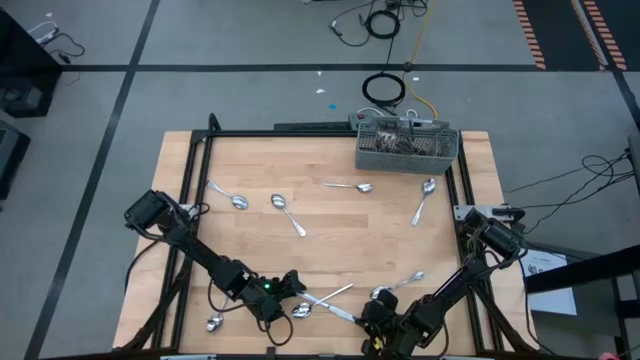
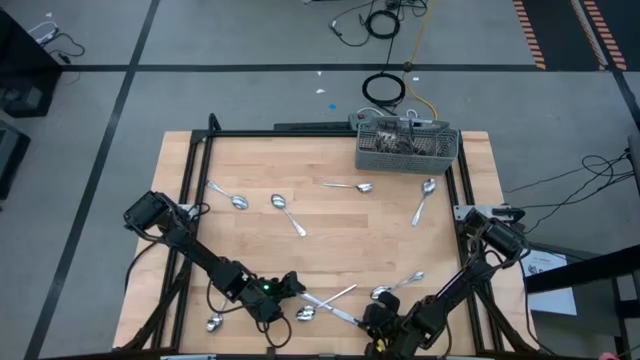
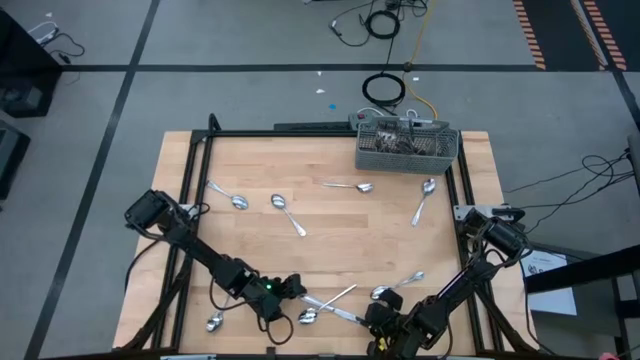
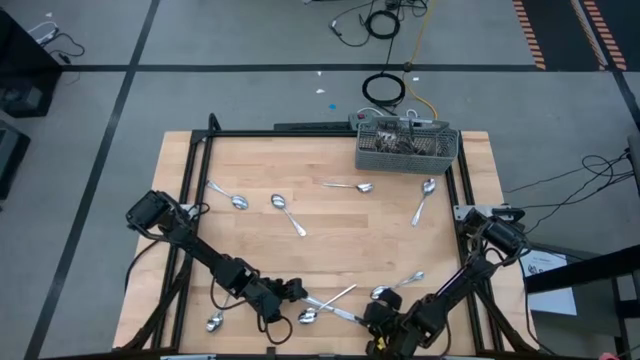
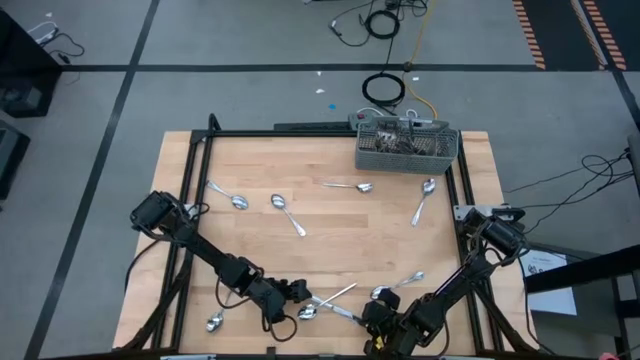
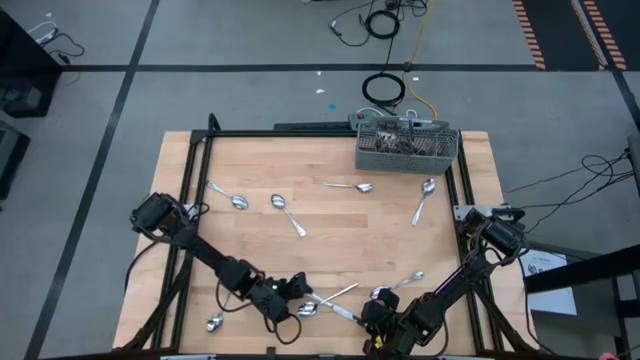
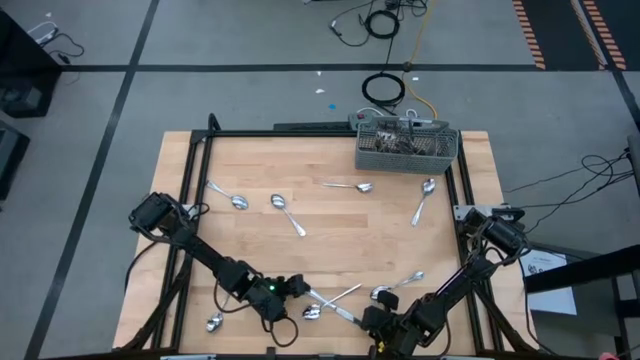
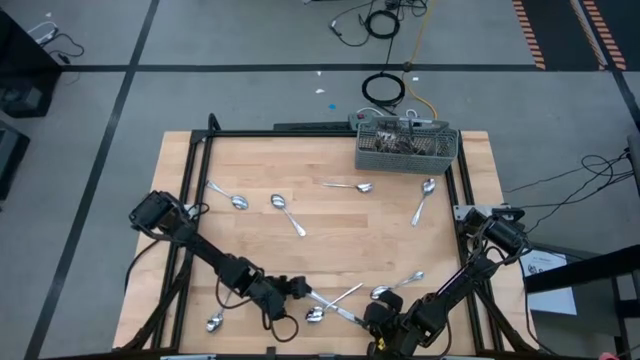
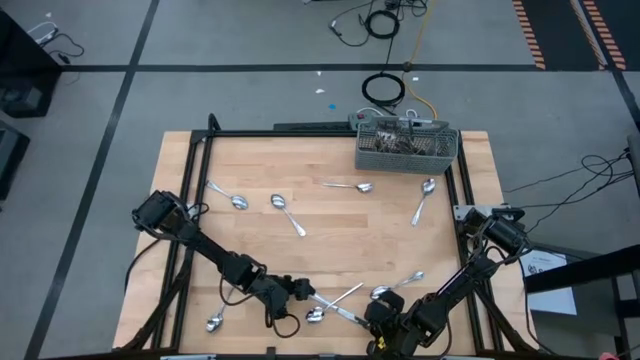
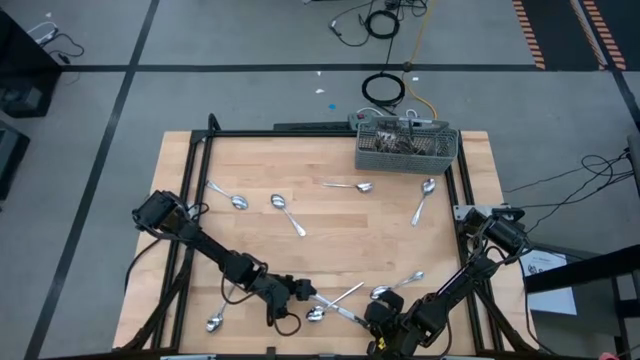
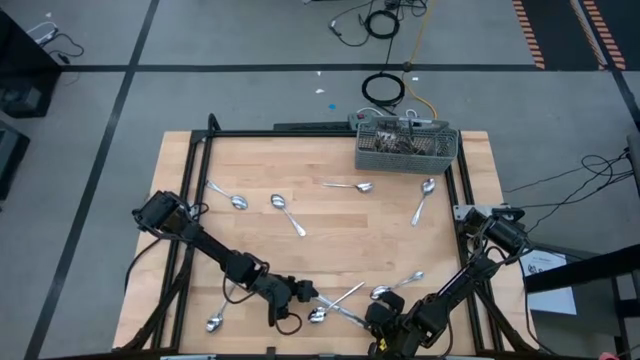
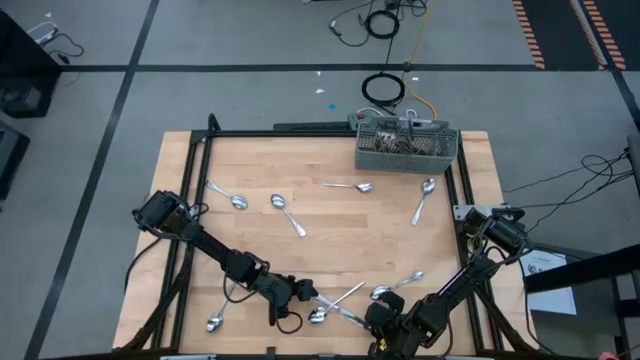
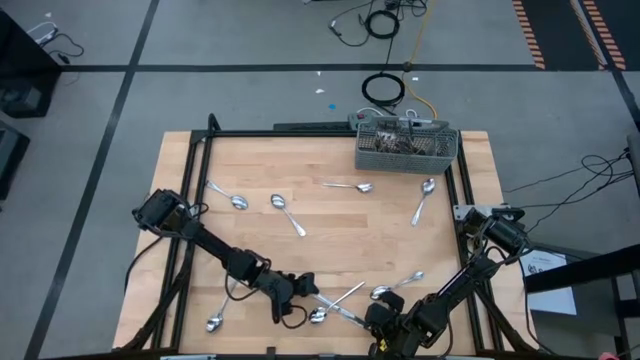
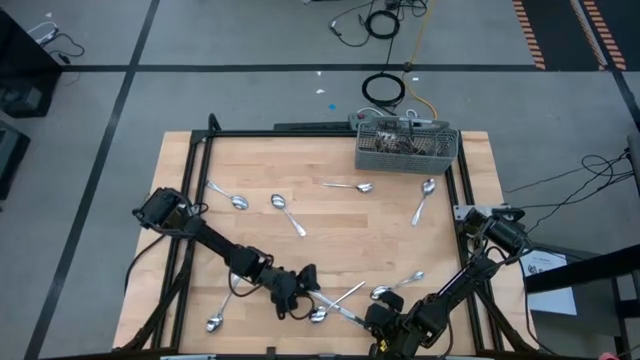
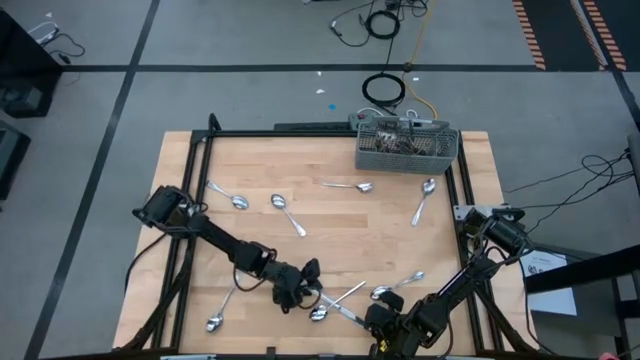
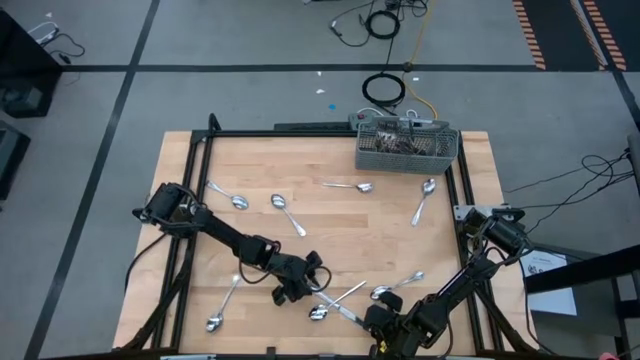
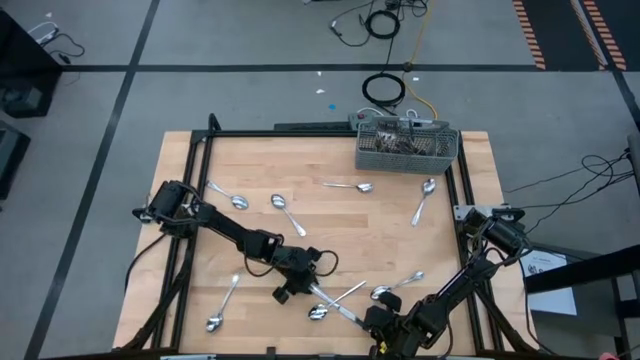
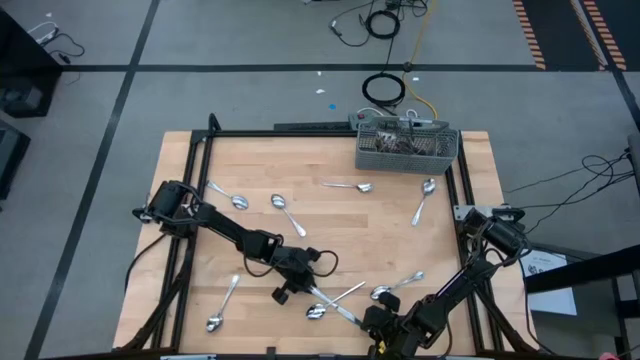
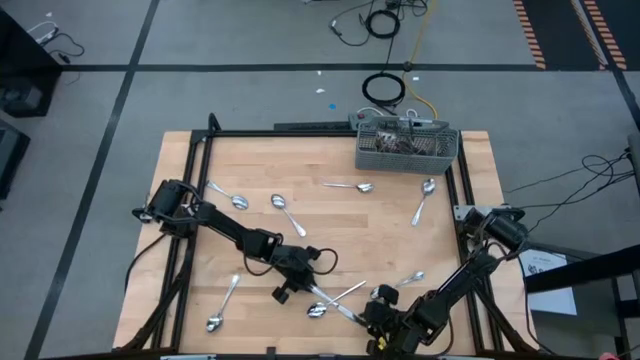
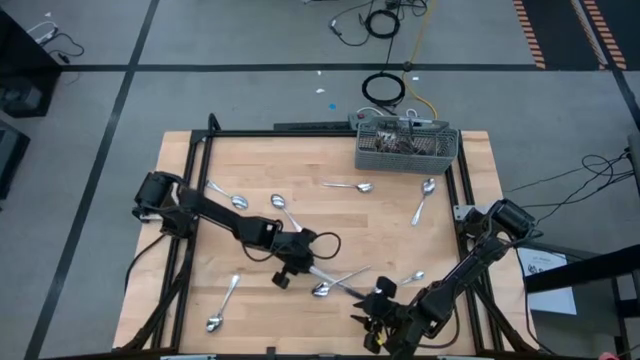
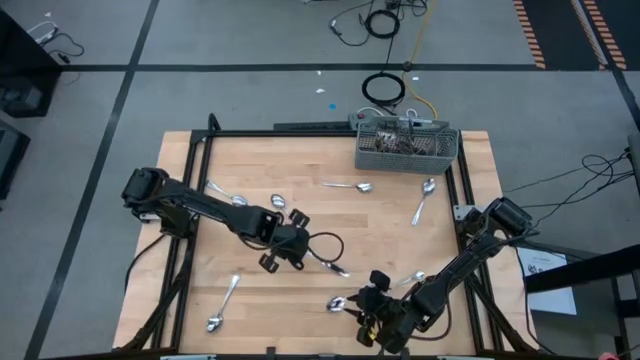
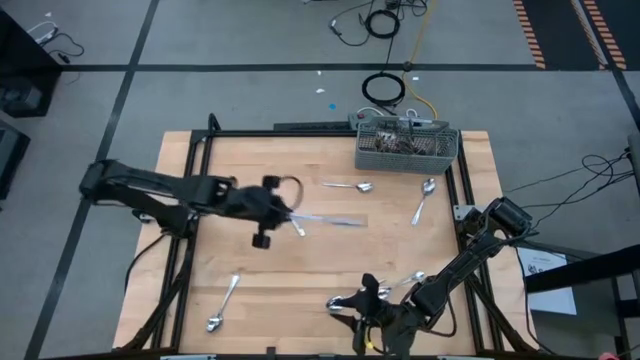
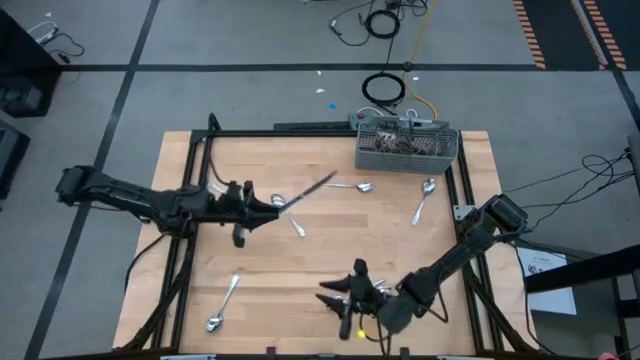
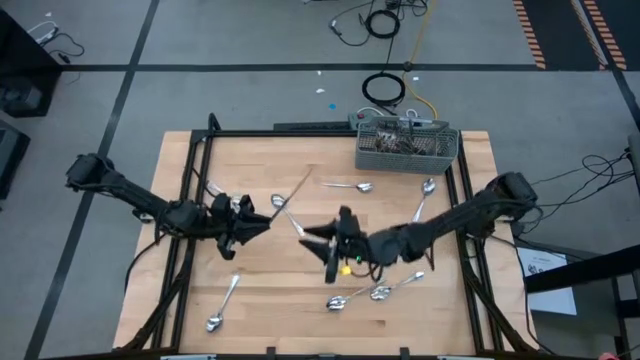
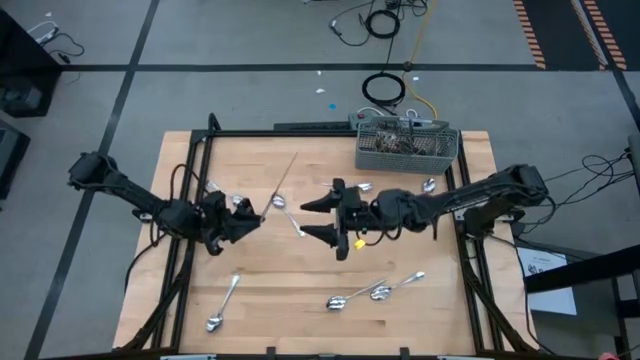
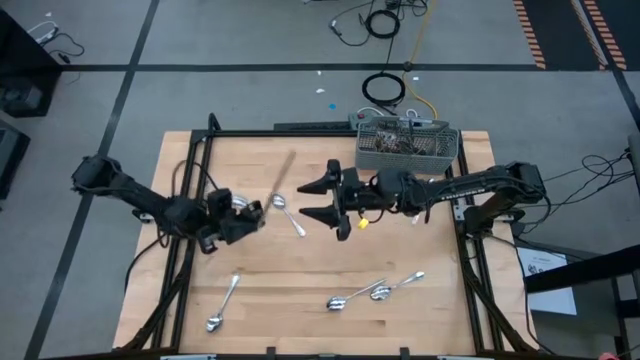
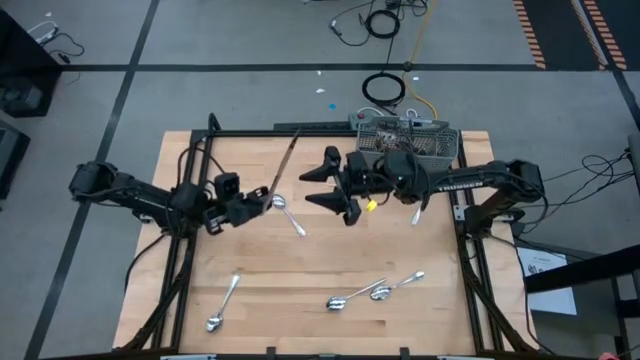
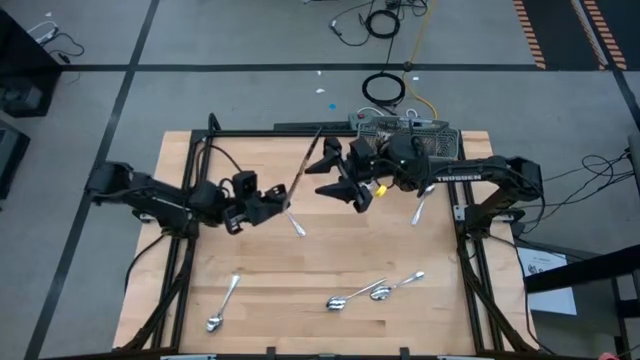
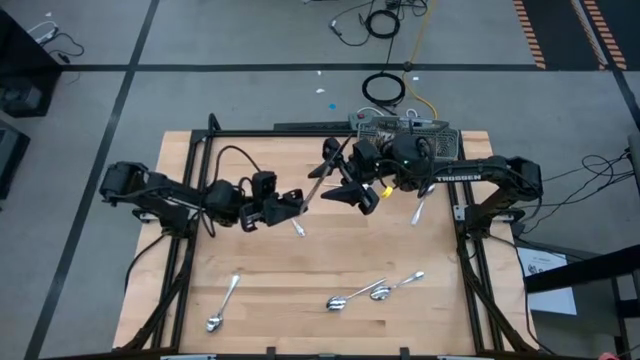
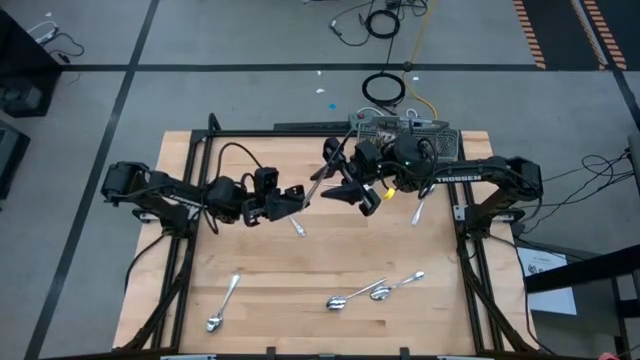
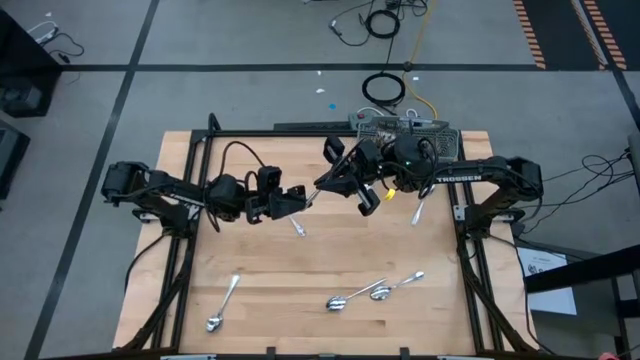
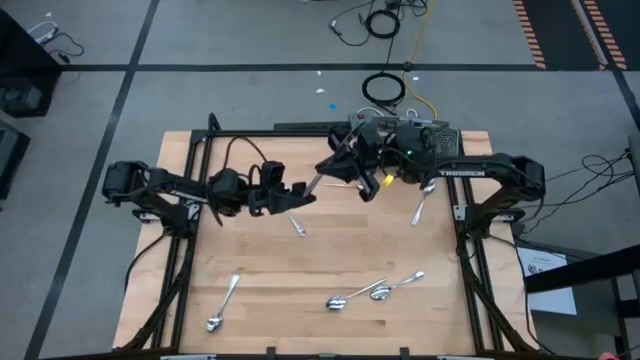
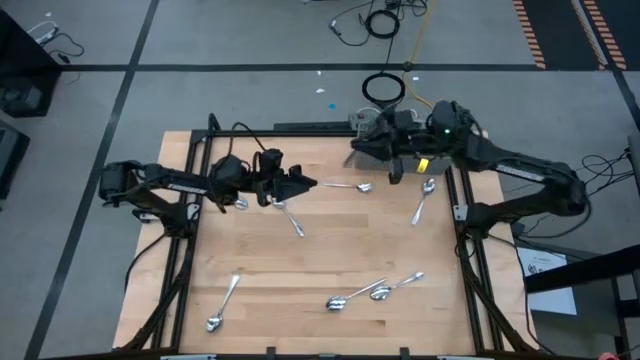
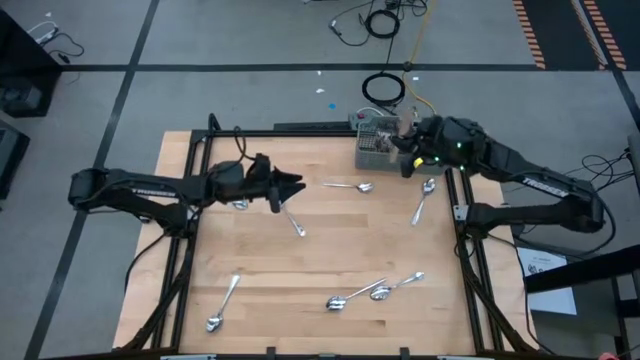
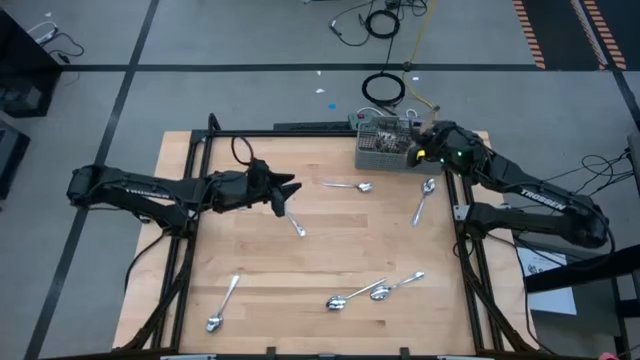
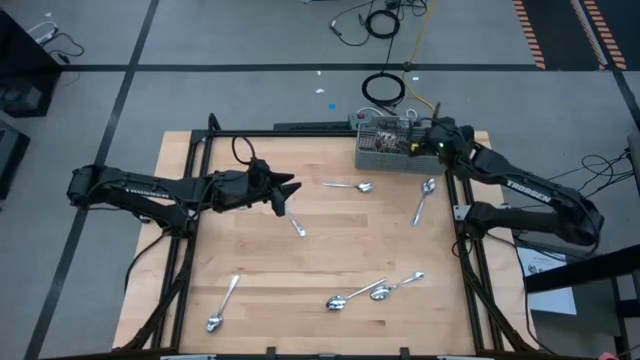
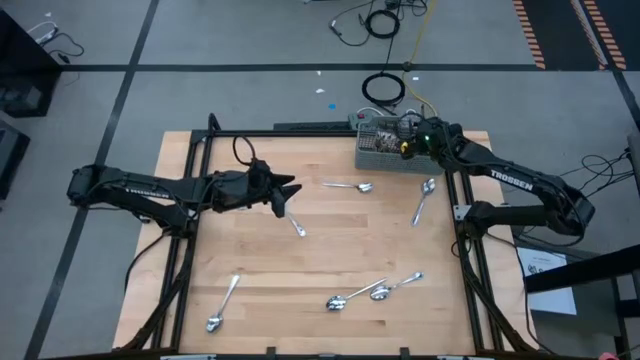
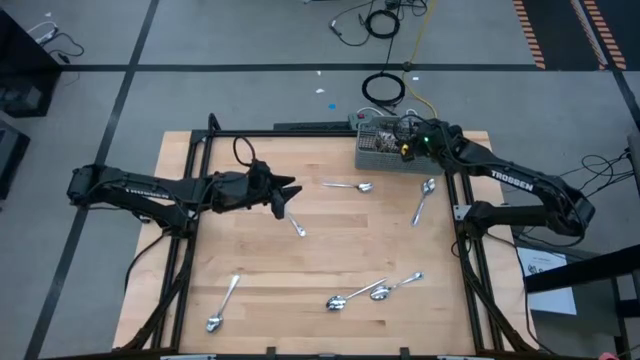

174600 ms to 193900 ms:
Task: Sort silverware
Put the silver table knife into the gray utensil holder
